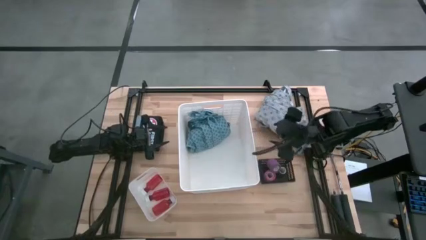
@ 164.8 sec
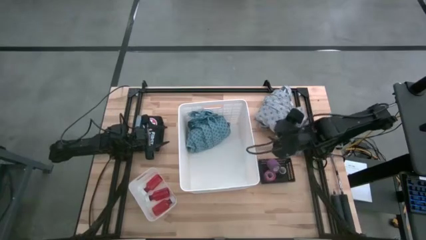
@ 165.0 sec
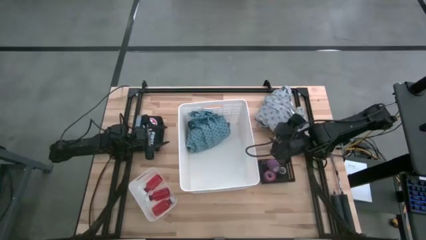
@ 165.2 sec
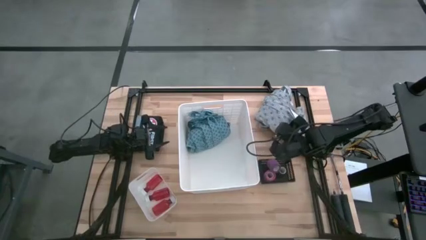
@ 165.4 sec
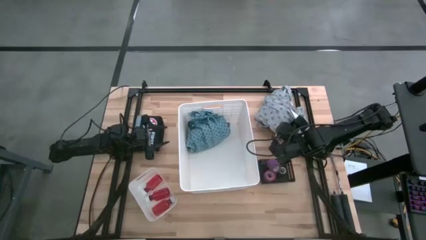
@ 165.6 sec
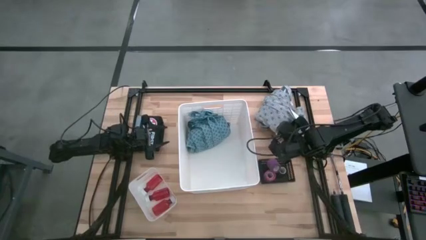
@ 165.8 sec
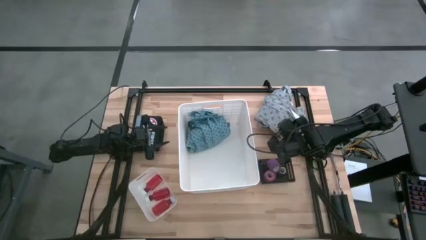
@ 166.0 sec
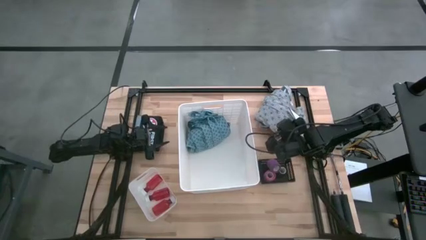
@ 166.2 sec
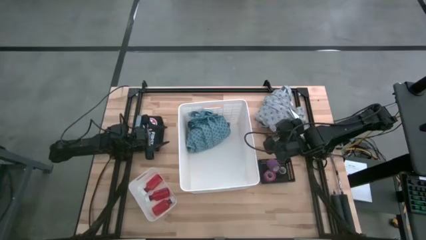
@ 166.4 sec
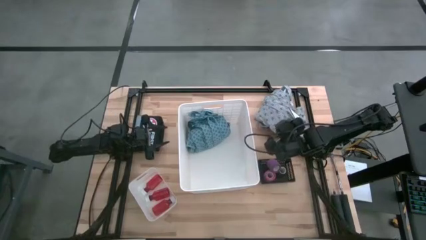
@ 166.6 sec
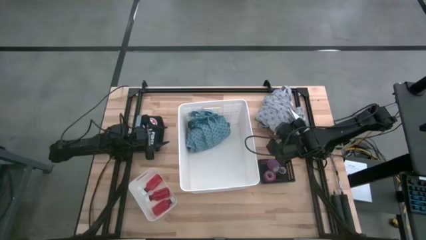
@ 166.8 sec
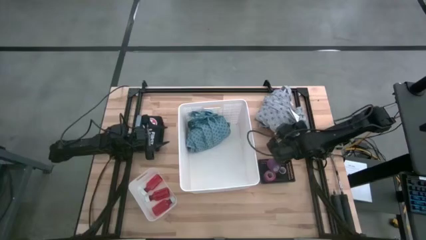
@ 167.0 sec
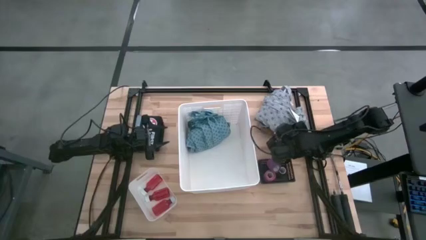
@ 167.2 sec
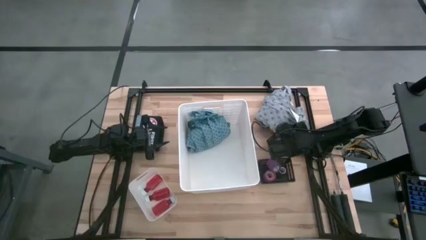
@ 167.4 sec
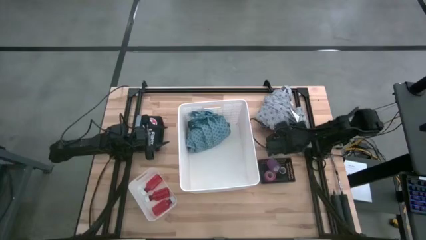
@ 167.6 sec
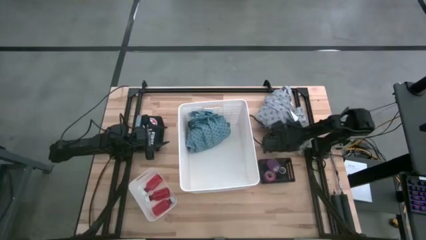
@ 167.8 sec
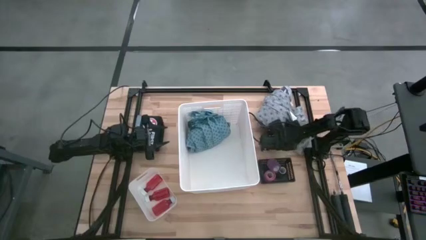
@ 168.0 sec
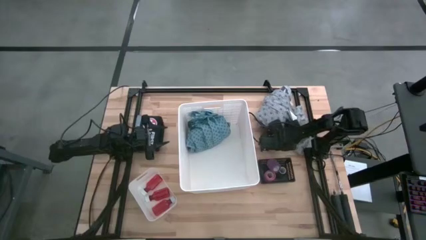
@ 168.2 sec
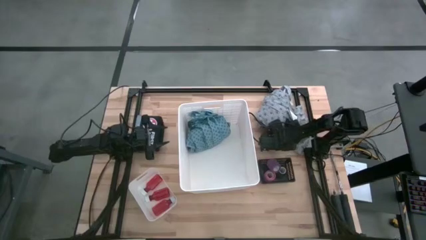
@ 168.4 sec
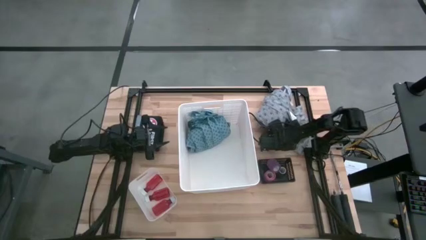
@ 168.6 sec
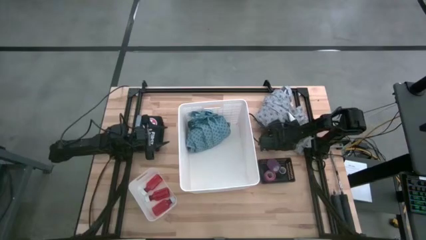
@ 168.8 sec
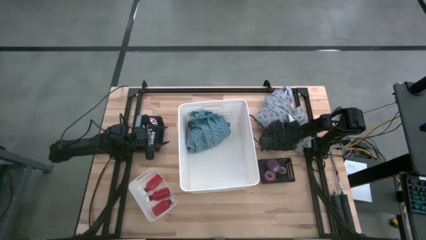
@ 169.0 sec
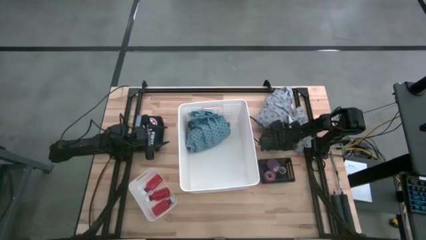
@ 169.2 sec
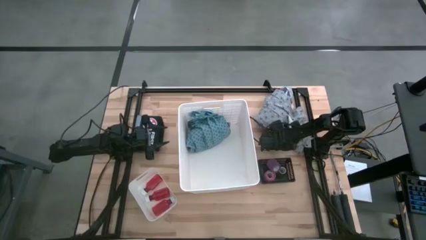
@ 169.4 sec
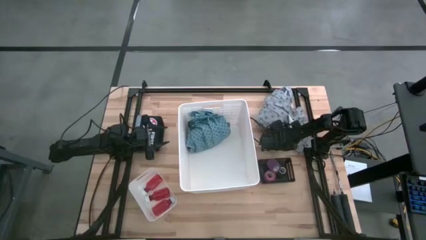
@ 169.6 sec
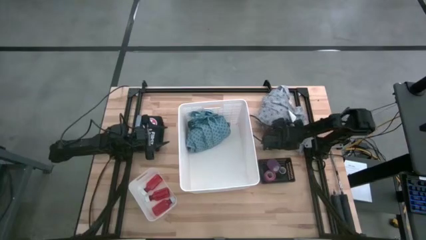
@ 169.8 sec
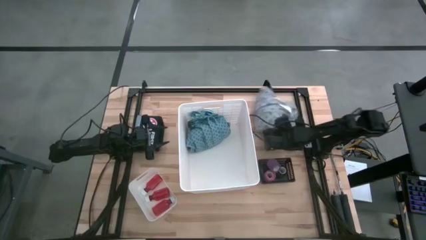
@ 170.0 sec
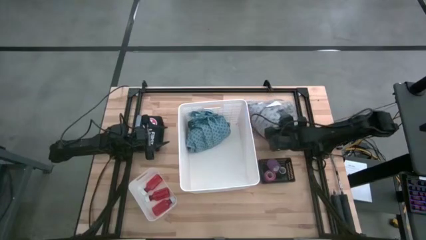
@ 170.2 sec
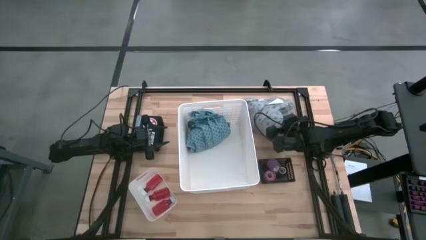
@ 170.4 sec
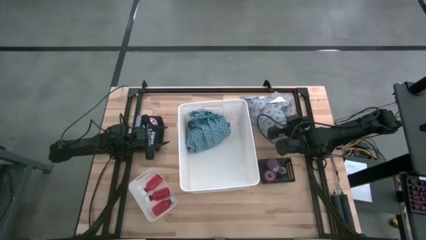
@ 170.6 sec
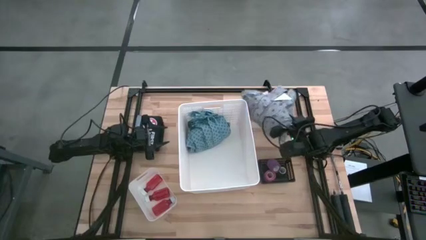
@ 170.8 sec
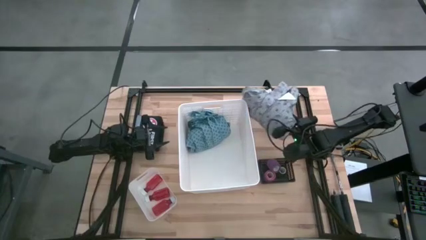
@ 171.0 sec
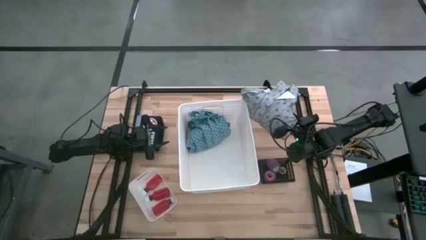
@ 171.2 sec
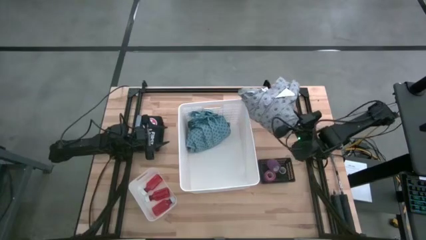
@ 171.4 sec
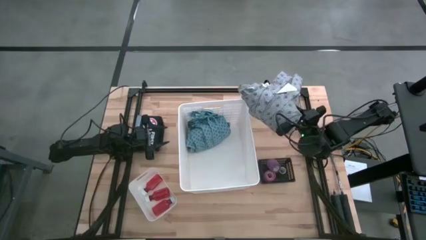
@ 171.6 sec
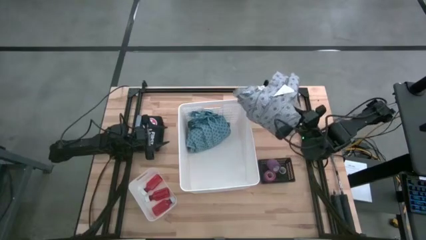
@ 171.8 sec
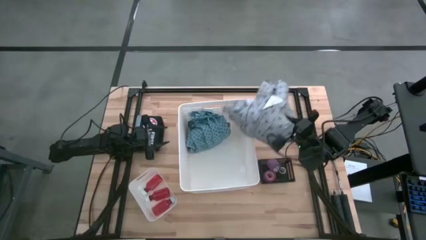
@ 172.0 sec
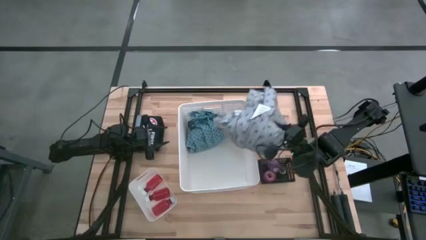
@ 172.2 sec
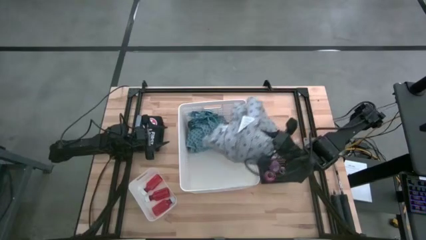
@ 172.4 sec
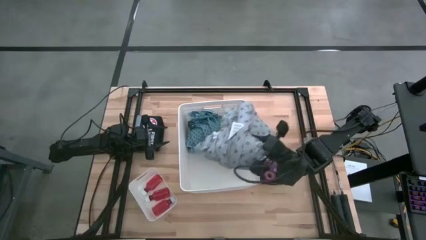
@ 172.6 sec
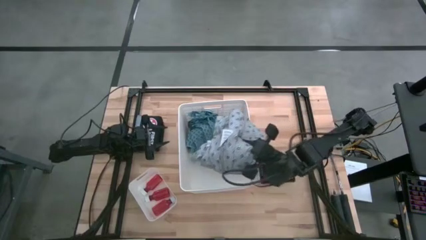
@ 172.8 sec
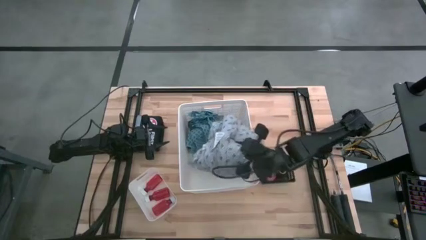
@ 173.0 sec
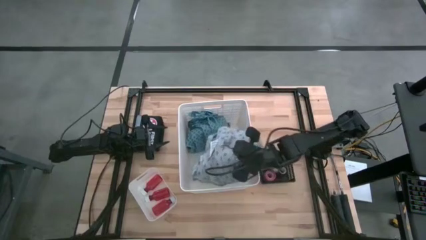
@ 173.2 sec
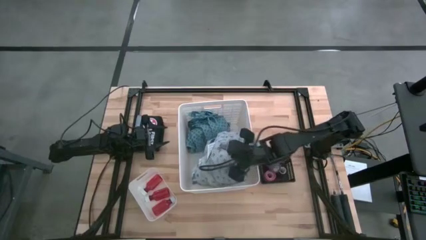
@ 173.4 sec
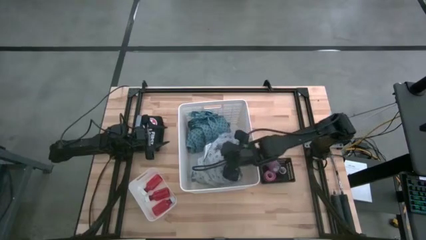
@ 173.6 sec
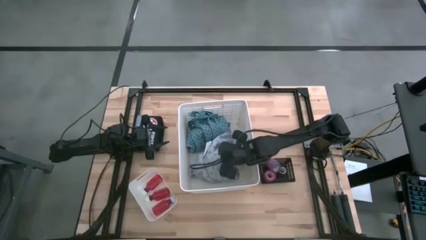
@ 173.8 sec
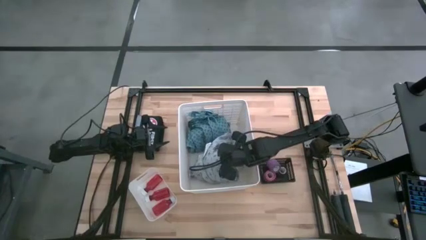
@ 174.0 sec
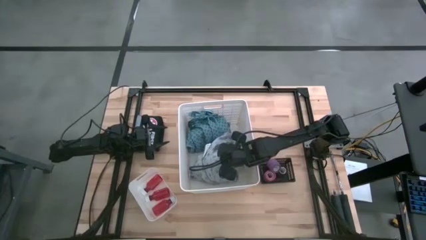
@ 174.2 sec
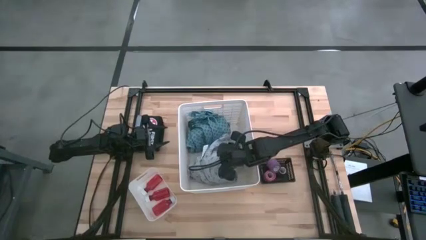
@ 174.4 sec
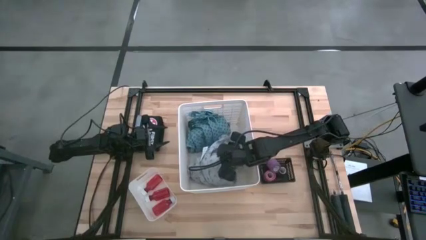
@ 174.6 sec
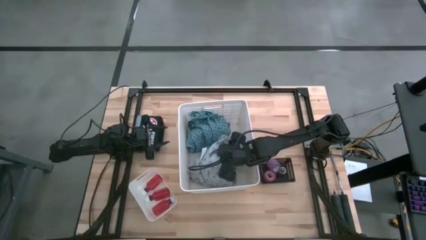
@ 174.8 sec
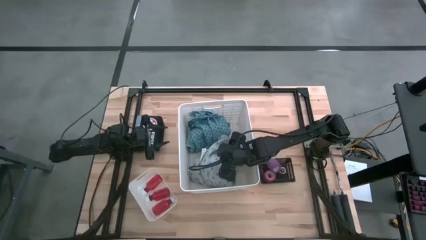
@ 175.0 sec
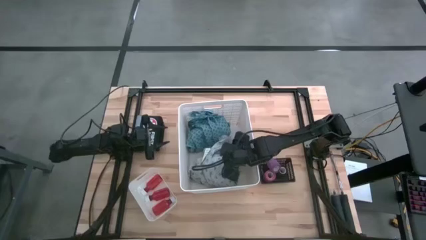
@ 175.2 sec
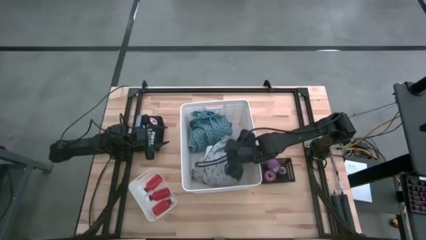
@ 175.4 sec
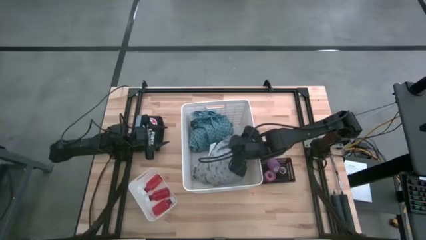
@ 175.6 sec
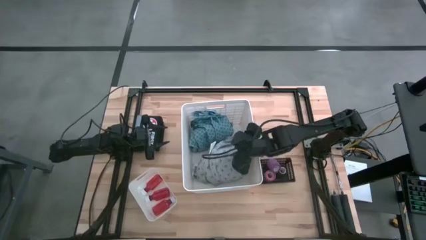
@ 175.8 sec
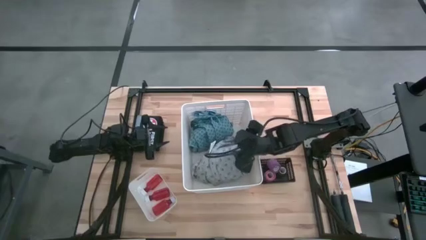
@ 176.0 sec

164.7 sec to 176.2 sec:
Task: Pick & place medical supplies in basket/bin
Put the light blue patient gown into the organizer bin

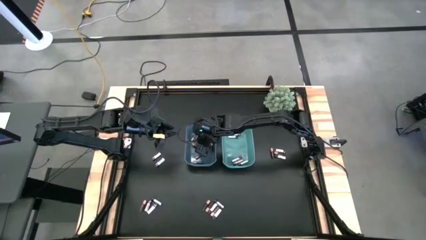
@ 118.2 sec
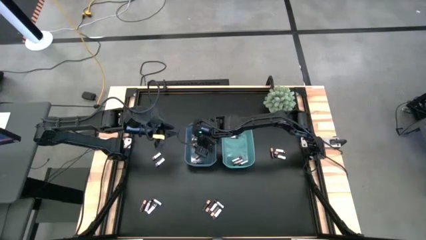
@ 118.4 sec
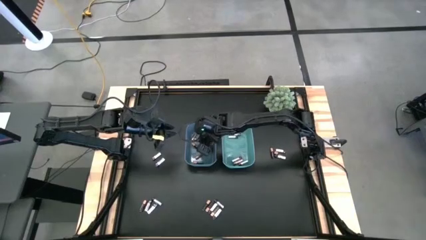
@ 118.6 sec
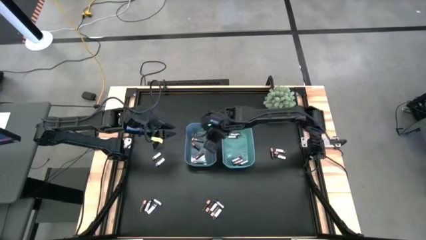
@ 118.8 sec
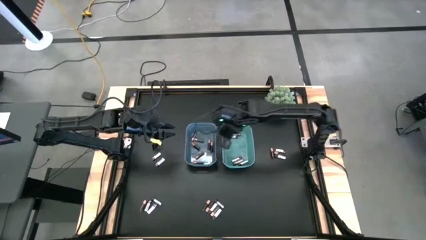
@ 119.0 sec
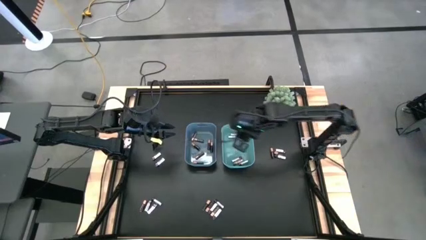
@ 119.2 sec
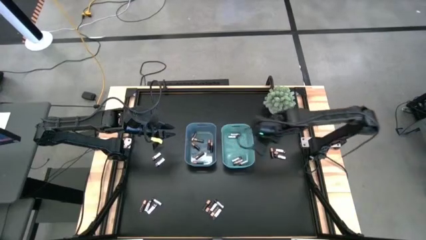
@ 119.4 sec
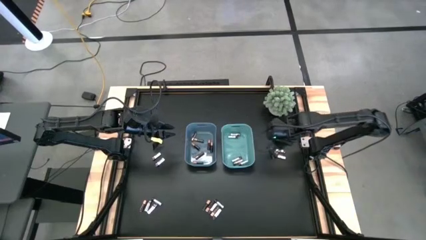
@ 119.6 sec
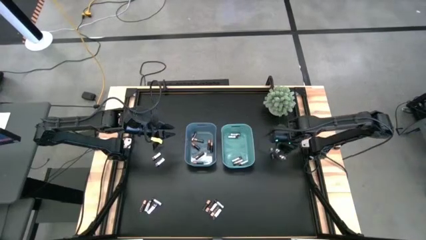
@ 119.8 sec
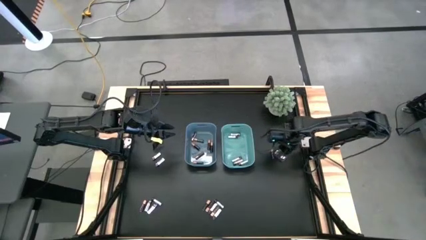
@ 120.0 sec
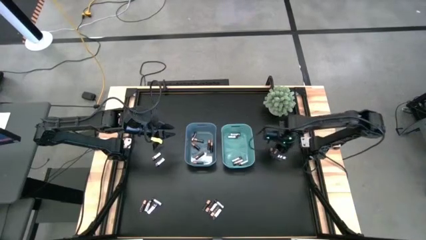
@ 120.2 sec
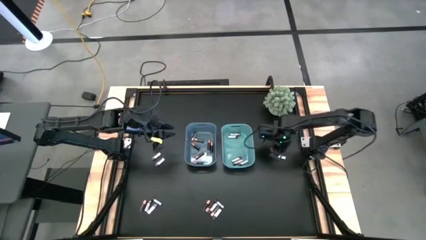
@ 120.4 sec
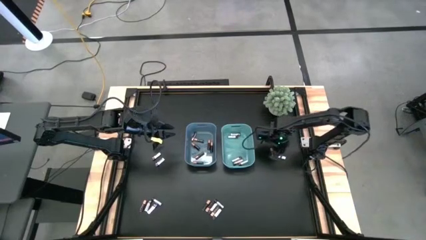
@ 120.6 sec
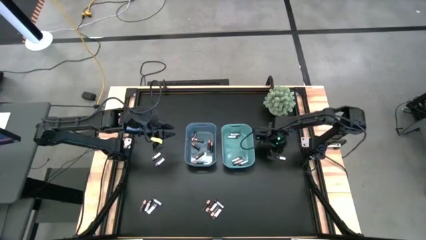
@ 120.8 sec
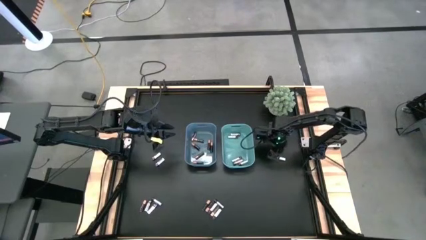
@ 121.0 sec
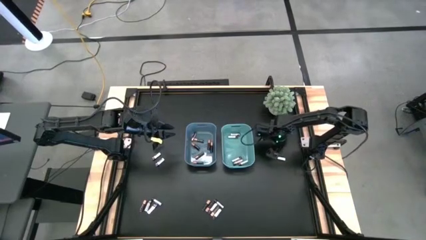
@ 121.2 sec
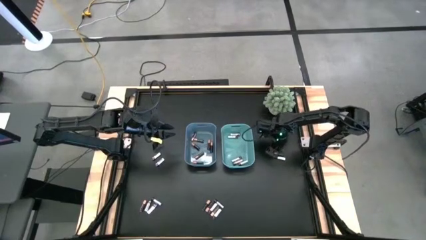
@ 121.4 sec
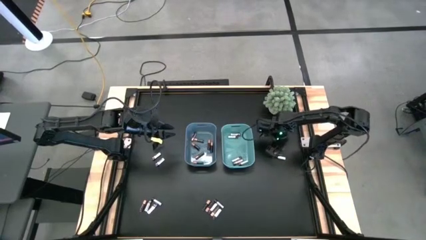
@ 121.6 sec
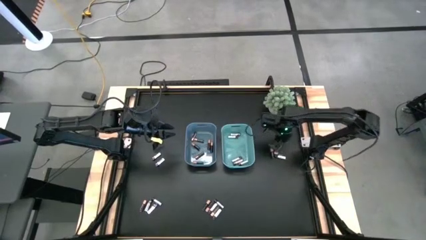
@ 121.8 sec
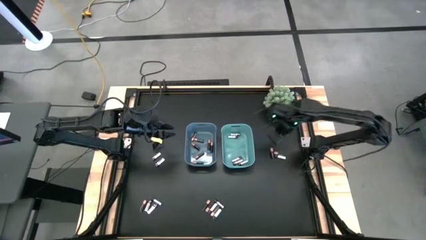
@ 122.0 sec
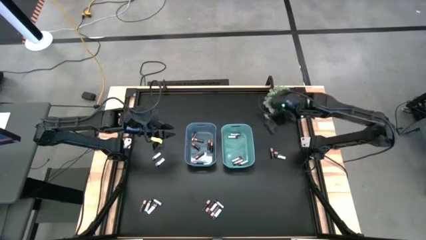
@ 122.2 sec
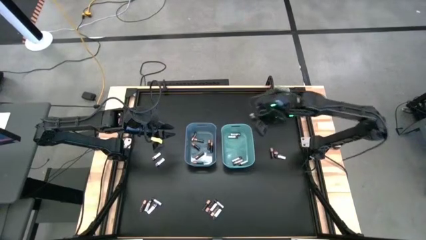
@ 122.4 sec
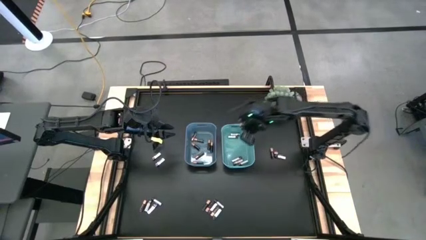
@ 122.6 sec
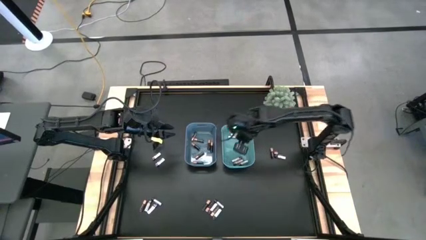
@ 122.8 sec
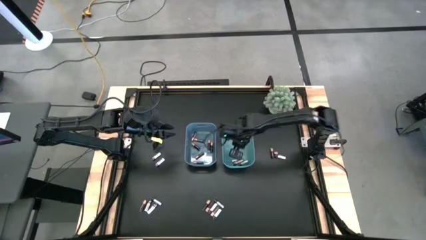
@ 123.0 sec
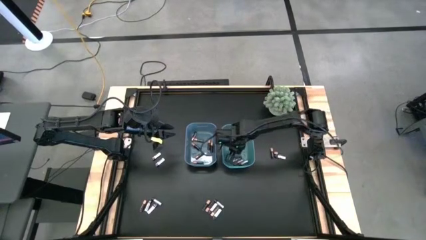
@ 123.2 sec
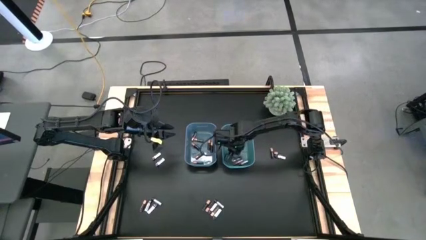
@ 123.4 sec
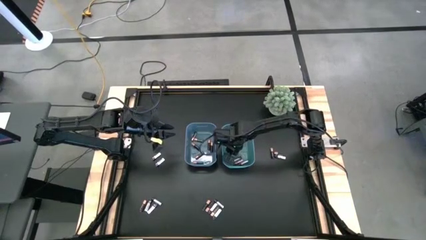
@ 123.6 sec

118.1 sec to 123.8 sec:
Task: Sort batteries
Put the white battery into the green bin
